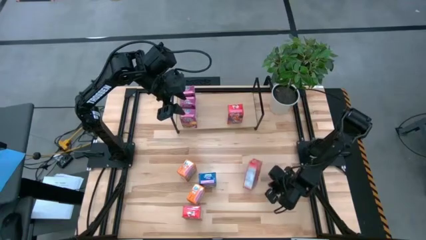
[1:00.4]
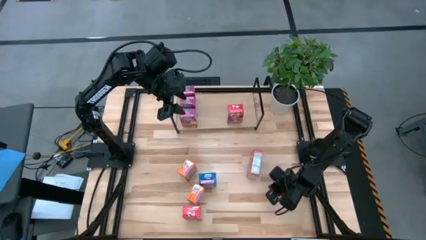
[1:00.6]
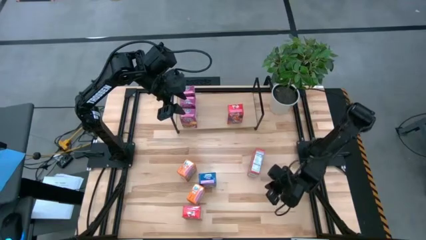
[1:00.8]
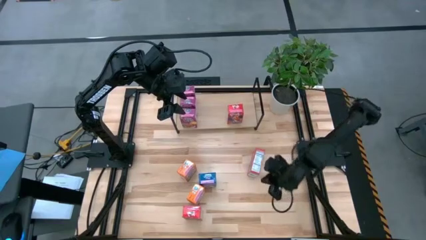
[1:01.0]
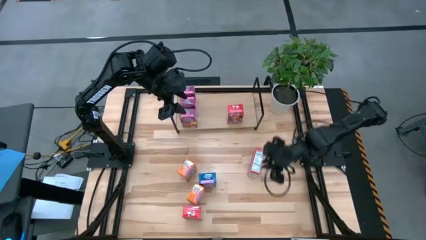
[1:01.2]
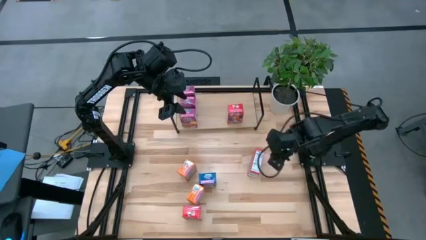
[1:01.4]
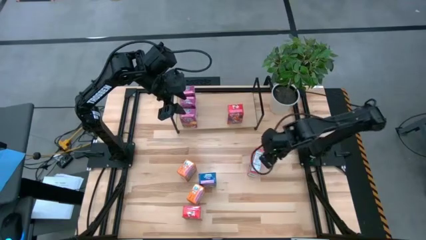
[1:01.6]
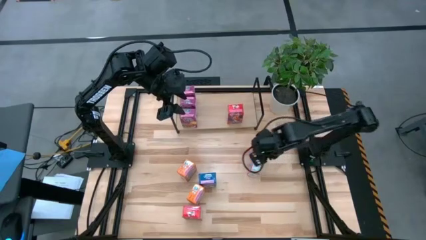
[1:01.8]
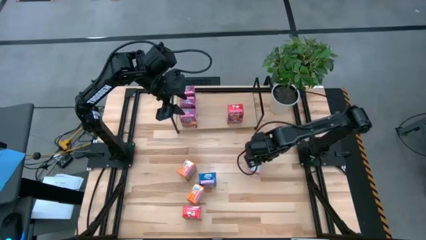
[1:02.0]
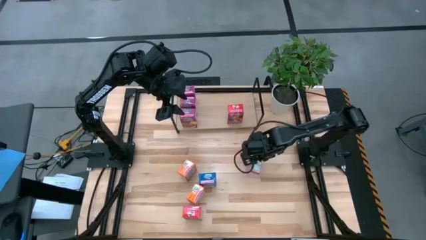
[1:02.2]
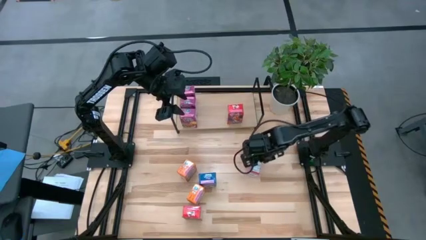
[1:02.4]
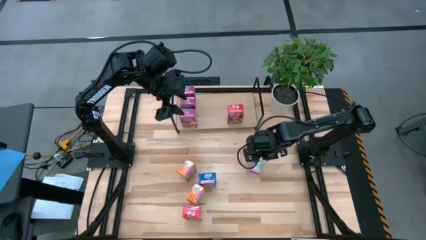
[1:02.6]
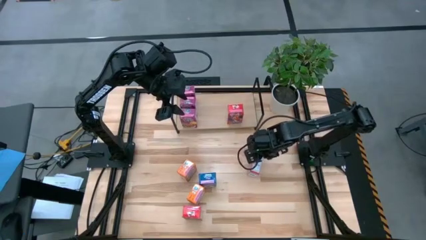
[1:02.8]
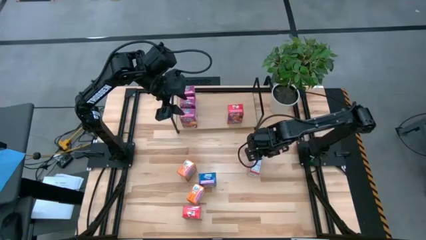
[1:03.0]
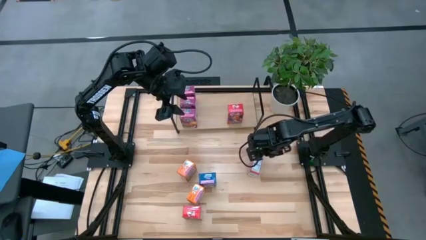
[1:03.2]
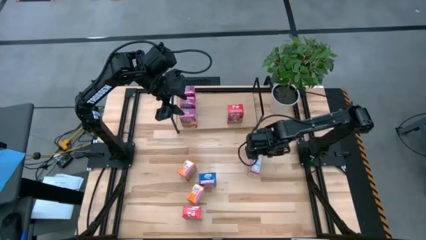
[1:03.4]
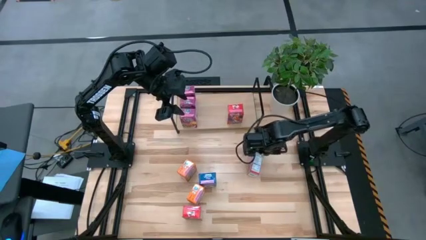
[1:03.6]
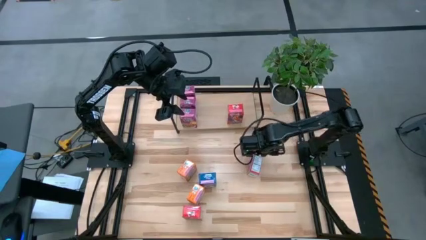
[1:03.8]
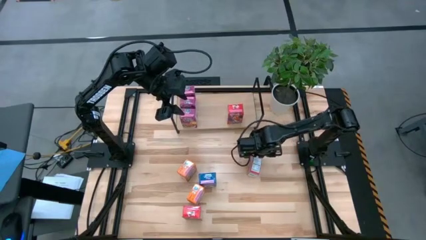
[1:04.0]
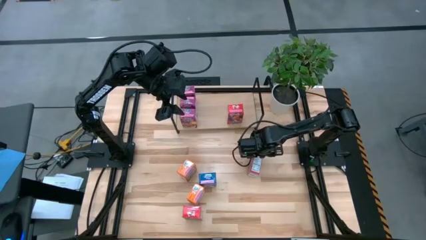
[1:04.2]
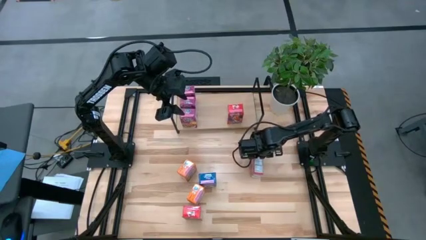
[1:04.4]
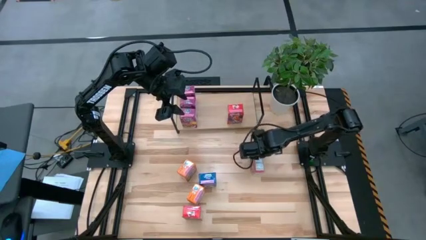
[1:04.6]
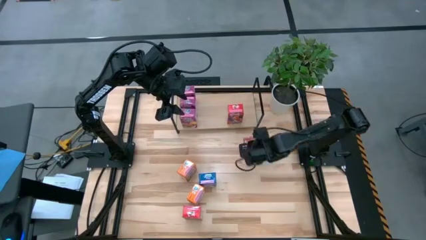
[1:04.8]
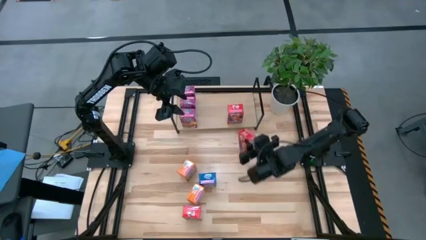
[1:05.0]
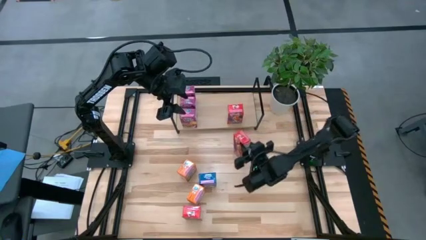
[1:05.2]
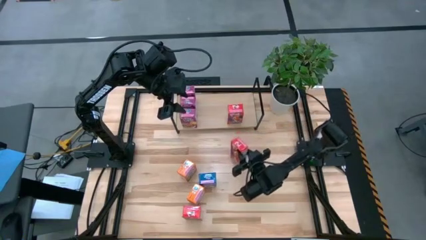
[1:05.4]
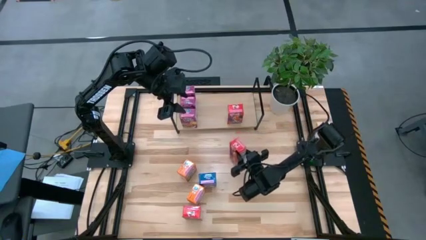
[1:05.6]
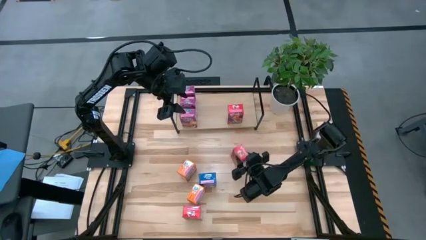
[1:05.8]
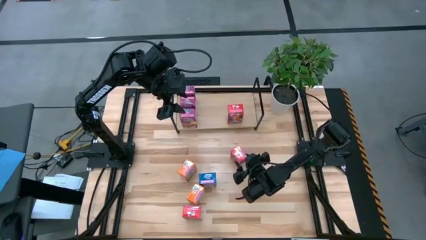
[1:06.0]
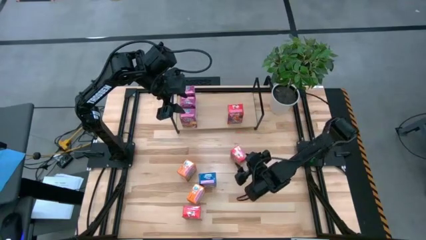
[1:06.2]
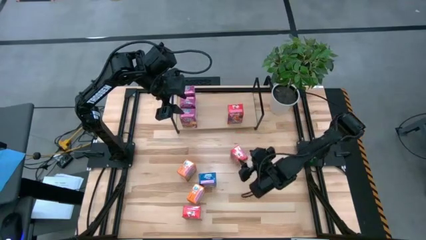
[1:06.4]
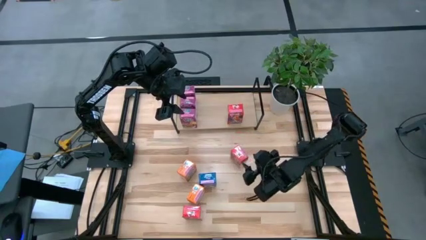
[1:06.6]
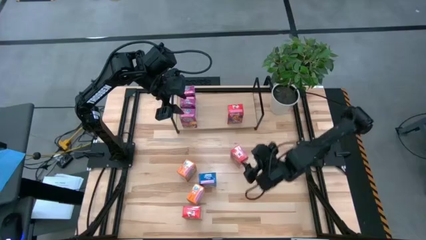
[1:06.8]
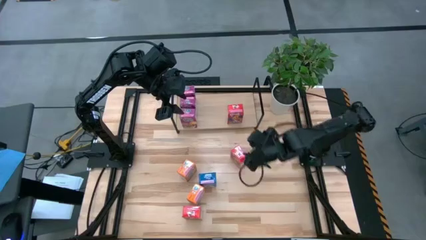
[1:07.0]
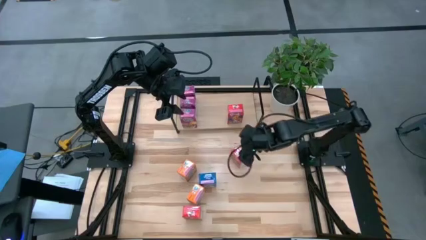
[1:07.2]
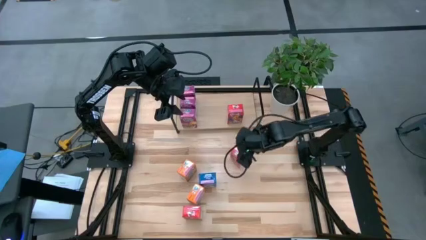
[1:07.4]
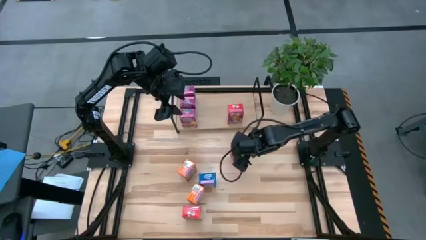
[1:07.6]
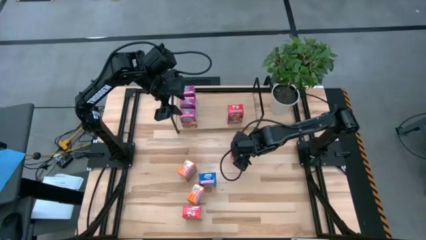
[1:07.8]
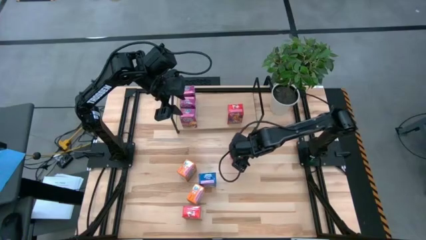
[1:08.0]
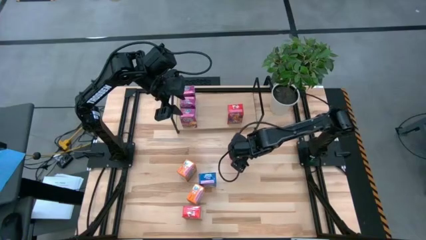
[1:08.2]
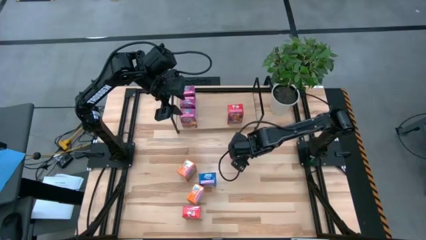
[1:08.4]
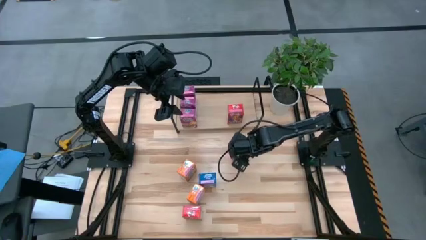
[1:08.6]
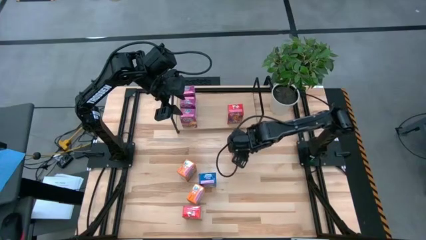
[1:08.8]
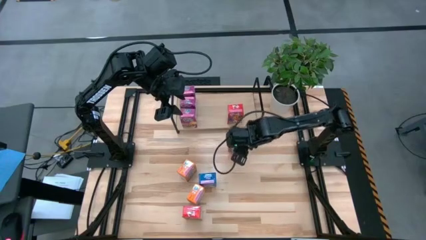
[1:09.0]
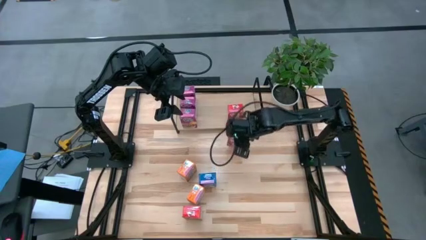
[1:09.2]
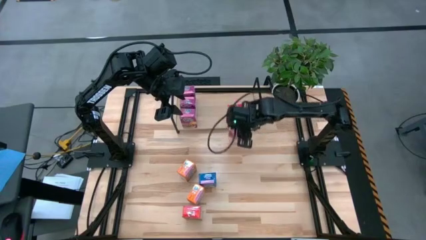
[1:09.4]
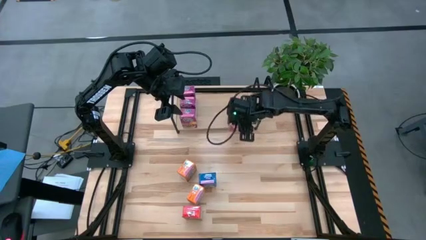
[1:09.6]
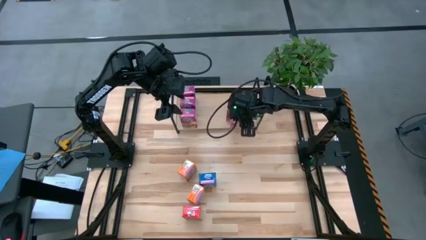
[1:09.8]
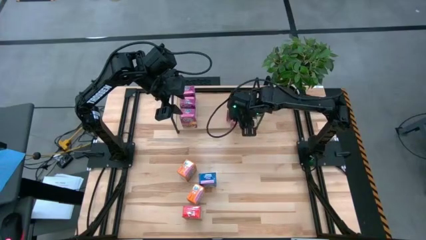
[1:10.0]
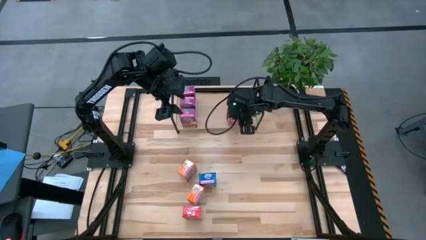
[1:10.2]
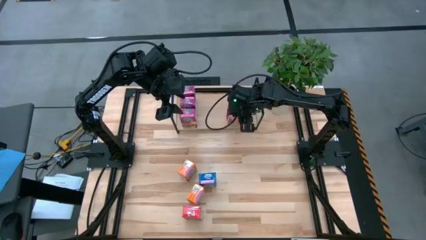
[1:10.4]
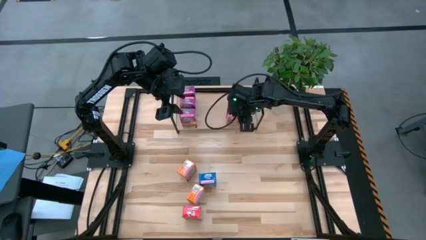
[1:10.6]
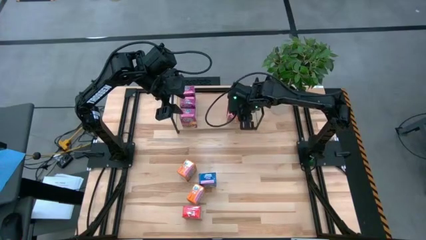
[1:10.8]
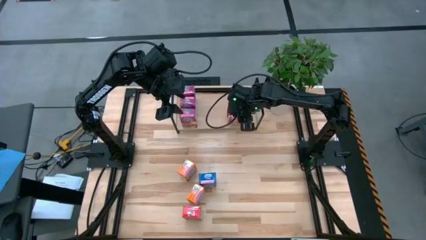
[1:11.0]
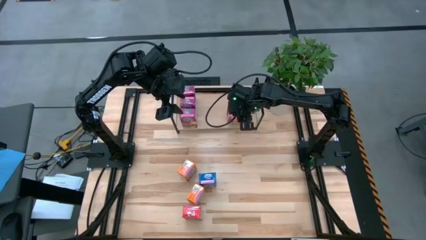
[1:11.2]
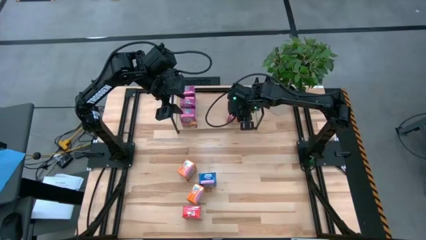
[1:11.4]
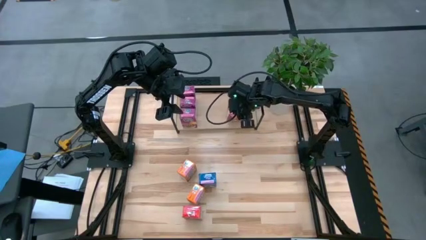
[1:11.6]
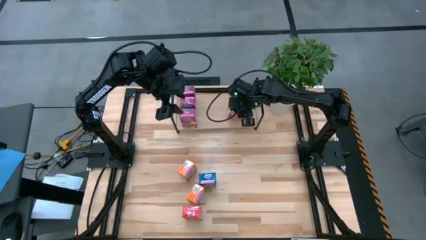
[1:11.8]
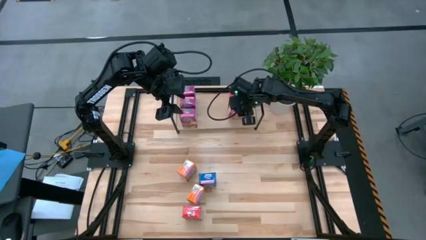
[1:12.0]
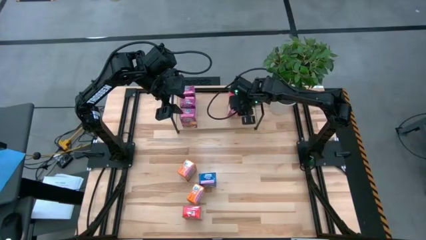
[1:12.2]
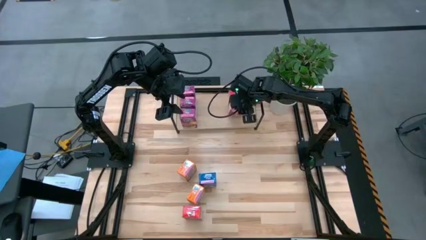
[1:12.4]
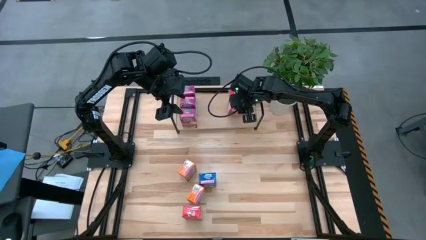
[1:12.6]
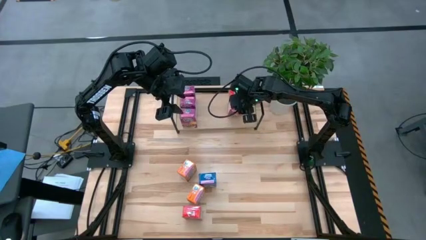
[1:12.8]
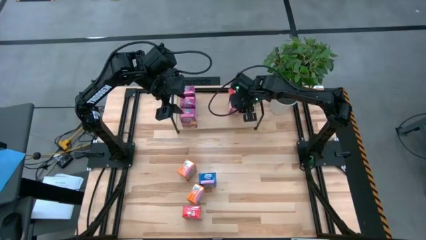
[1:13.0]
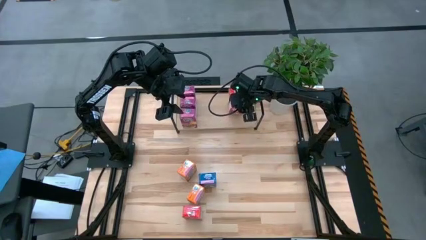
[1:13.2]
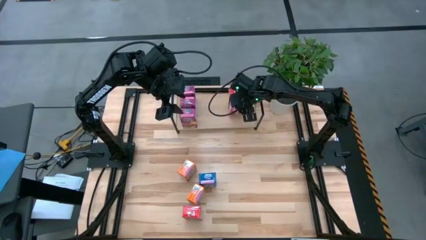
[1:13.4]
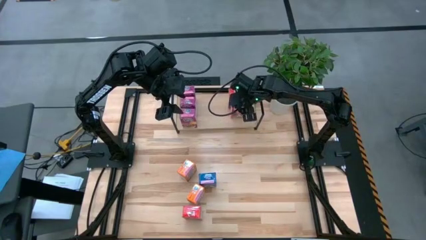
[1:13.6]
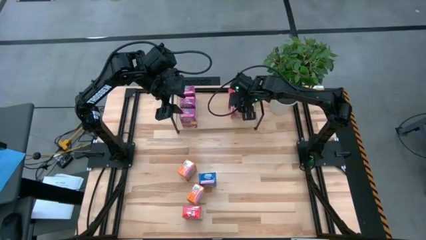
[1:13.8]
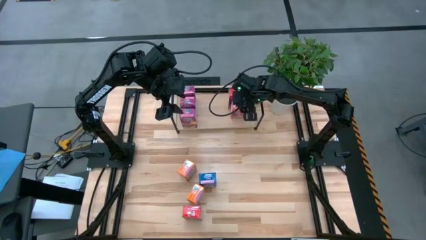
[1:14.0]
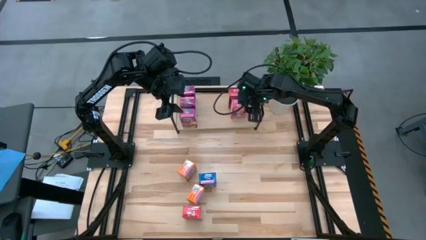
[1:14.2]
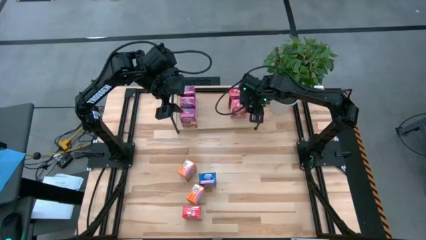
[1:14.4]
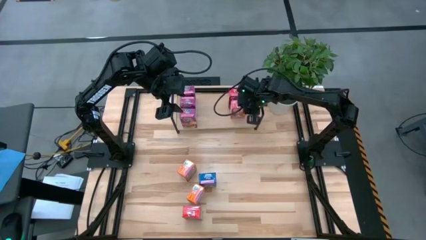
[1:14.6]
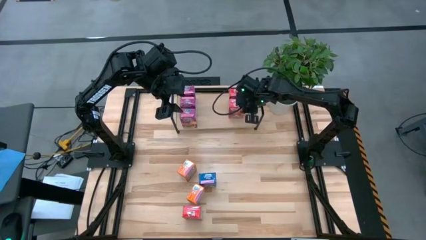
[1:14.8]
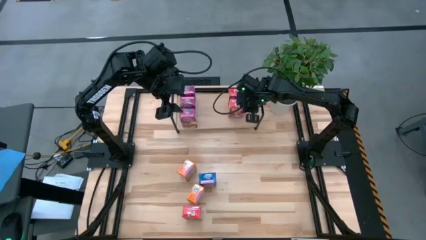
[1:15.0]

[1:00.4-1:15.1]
Task: Stack cereal on shelf
Put the top red cereal box on the shelf aligned with the other red cereal box
